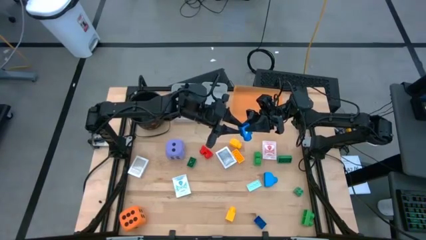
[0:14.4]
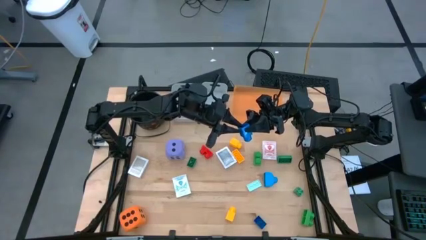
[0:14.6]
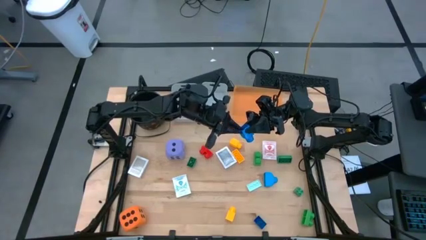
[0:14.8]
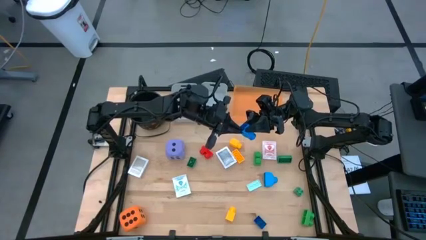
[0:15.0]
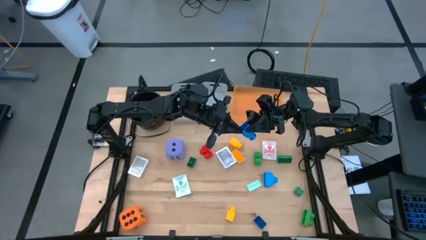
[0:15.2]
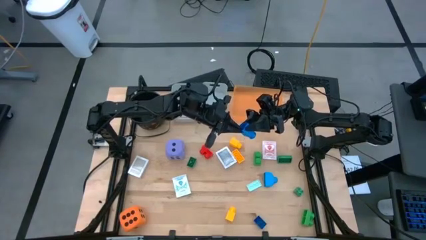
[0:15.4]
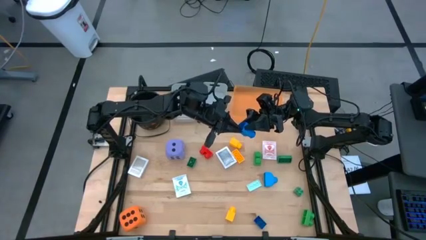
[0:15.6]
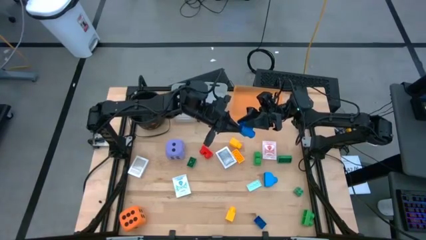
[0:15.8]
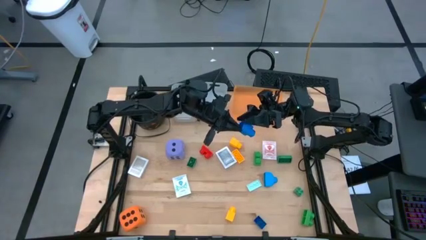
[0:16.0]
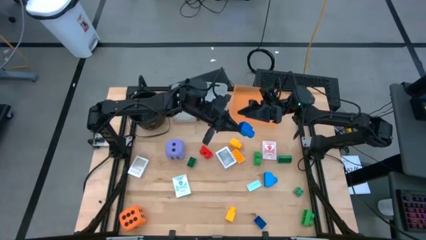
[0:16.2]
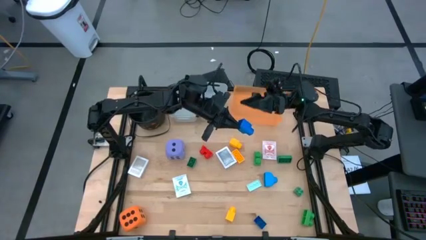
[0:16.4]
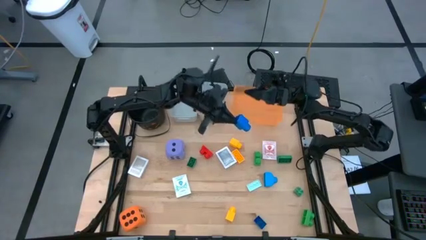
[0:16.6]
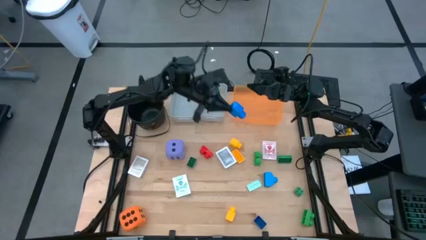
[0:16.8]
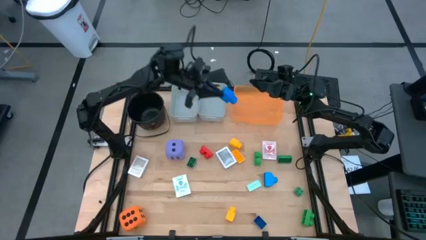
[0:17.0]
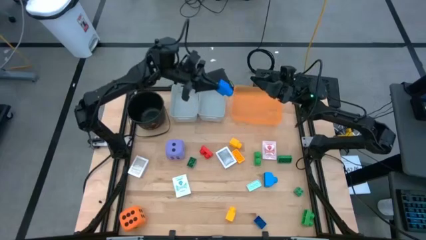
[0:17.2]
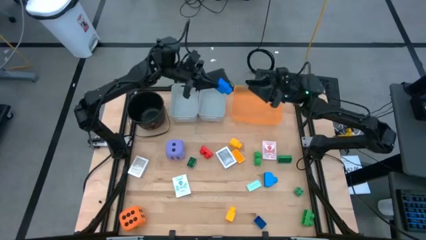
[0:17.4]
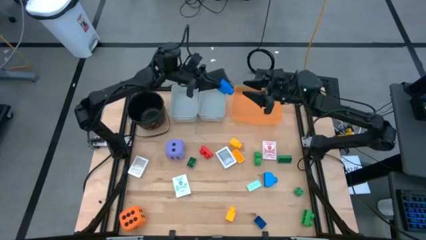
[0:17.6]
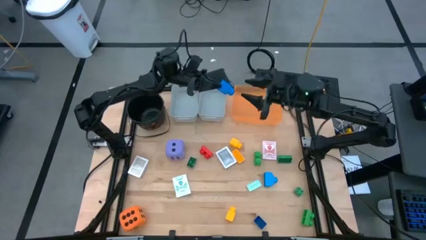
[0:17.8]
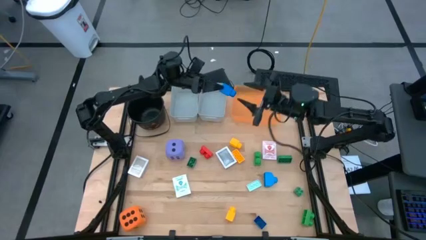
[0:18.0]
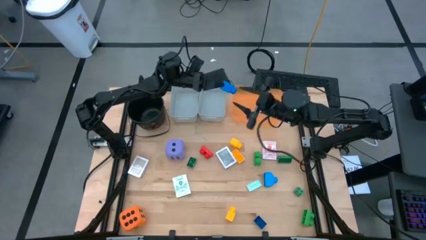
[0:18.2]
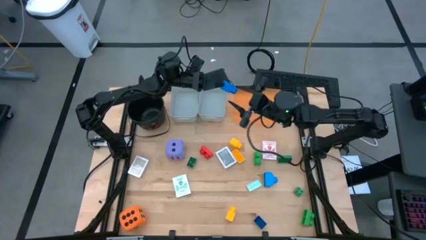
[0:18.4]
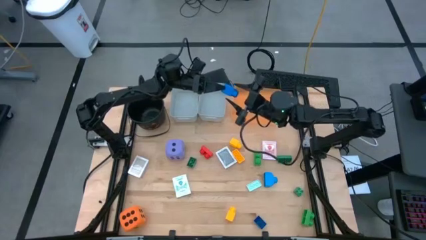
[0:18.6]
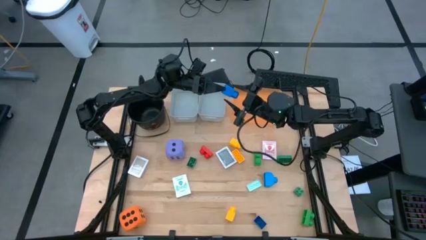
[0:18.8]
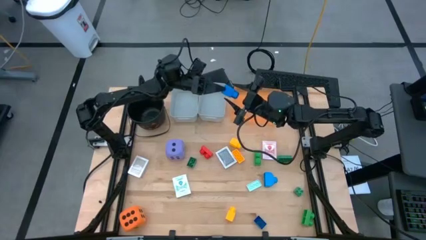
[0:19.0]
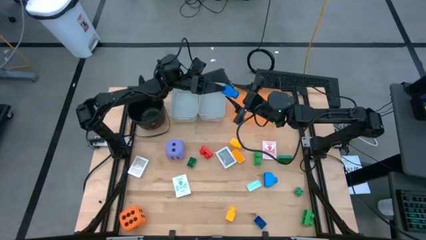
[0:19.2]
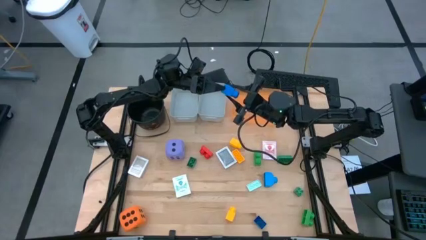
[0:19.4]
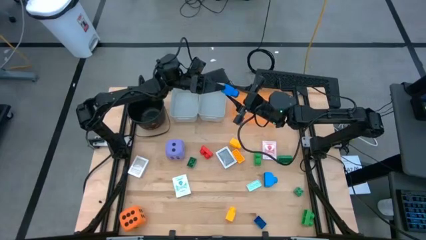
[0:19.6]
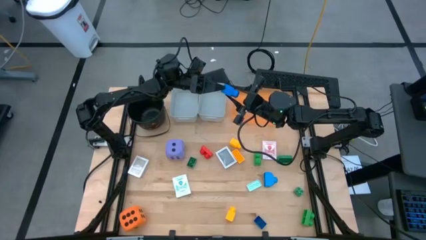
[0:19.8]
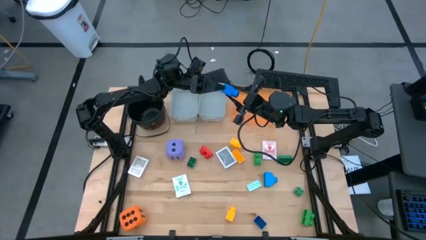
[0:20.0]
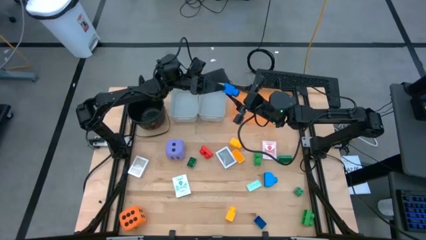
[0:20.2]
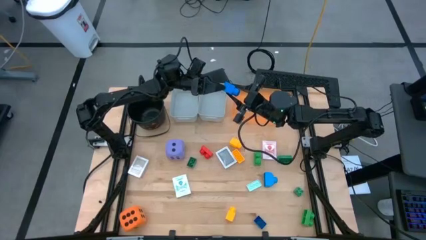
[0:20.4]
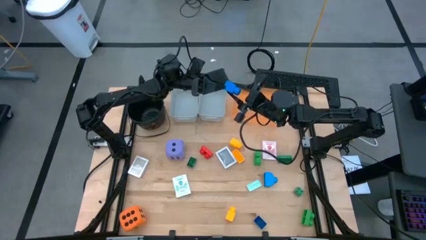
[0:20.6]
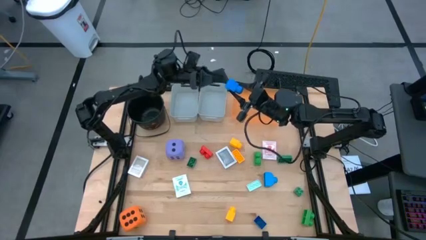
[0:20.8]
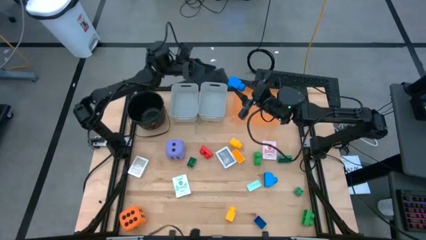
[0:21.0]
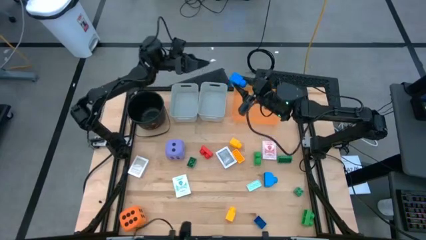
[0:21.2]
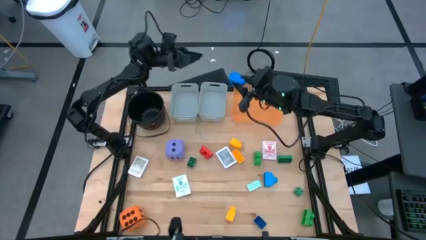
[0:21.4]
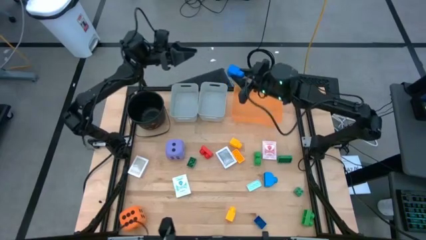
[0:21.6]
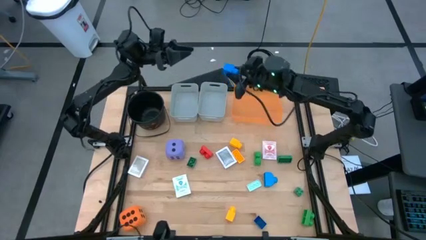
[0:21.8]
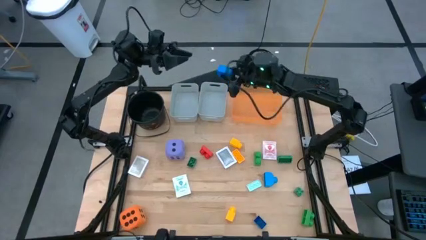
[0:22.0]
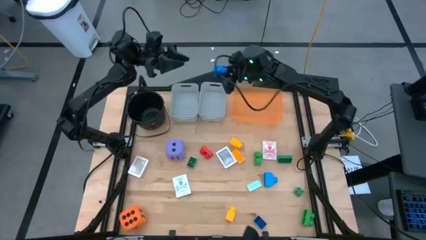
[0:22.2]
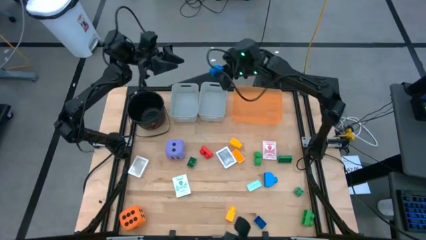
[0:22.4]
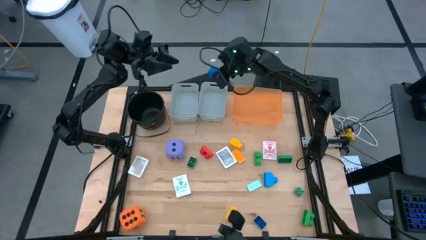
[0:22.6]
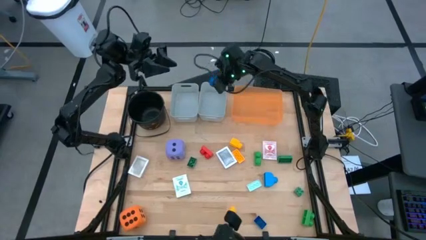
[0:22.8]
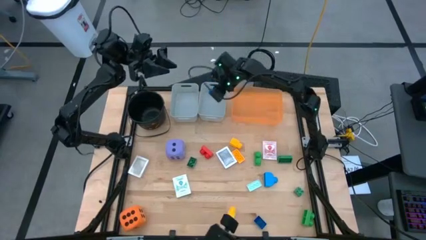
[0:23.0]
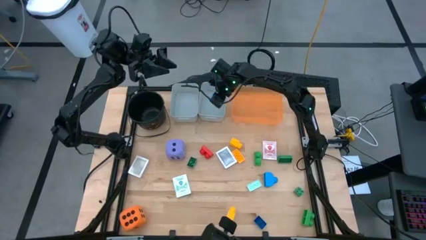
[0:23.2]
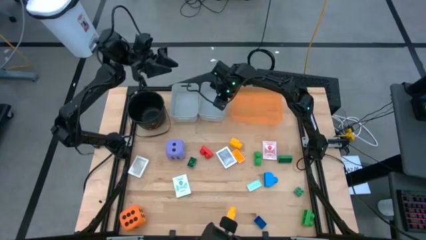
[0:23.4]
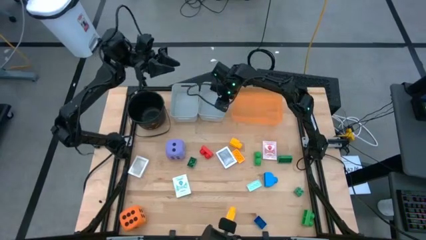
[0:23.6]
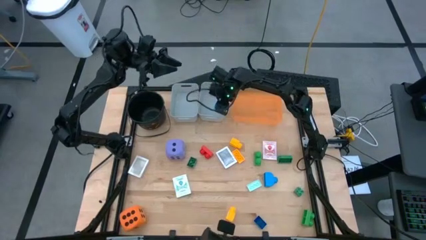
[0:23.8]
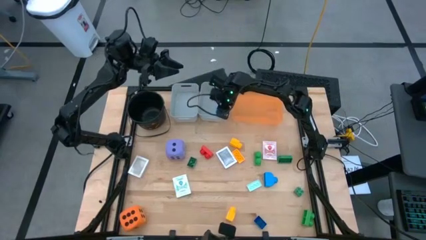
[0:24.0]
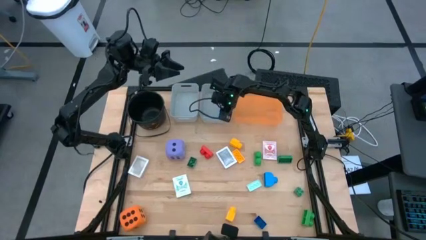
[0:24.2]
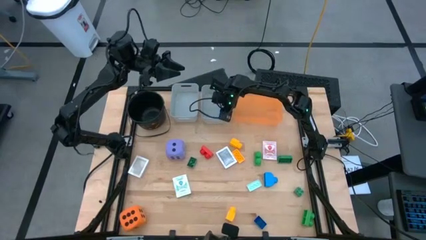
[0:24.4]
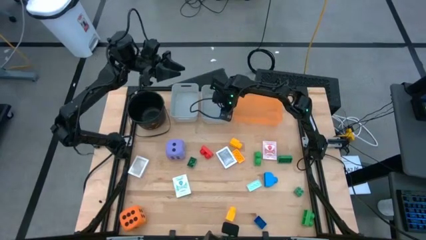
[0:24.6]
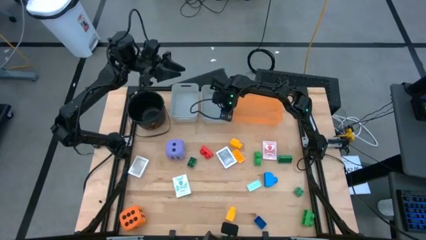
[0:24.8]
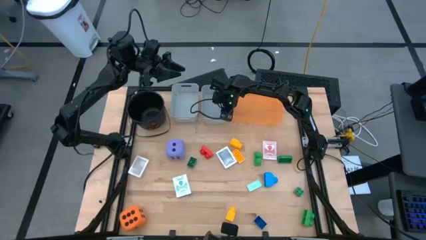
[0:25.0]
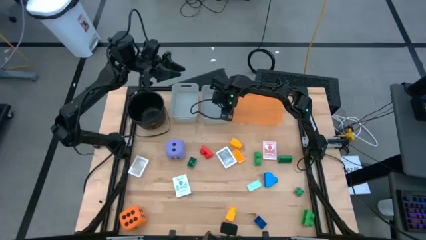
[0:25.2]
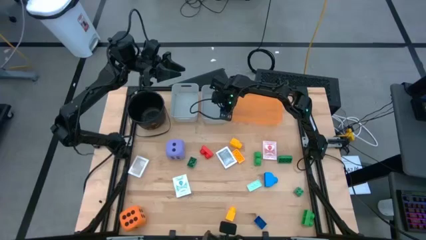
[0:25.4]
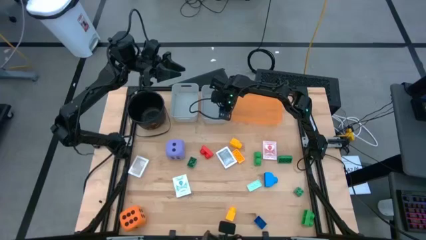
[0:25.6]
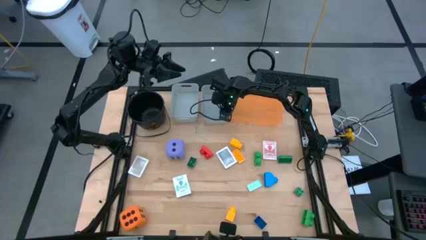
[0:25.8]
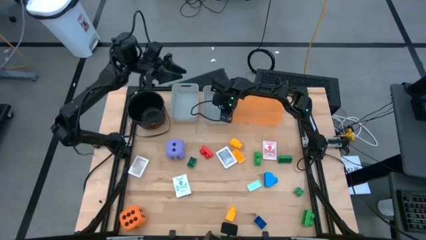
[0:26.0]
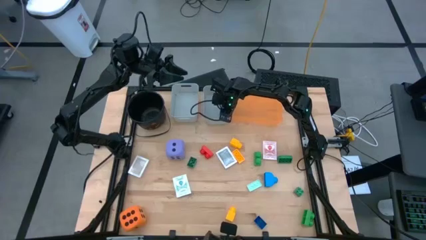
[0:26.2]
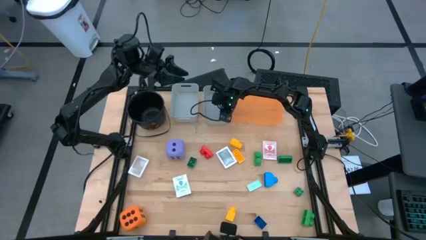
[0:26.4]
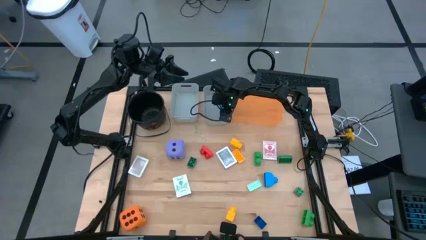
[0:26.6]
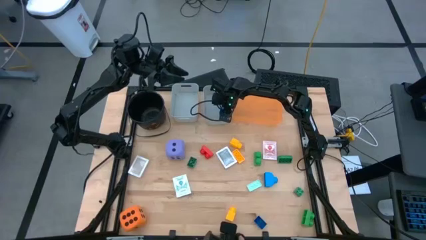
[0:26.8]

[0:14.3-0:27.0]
Task: Pick & Place Toys
Put the blue gamepiece into the right gray bin
